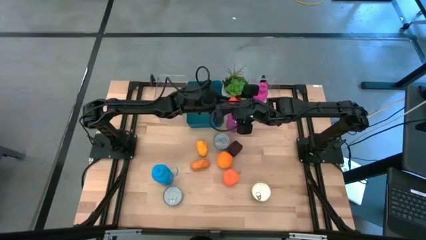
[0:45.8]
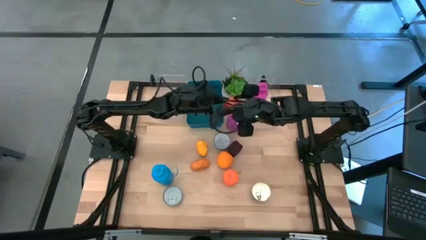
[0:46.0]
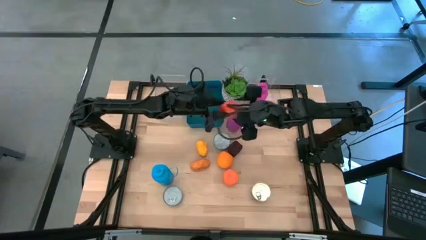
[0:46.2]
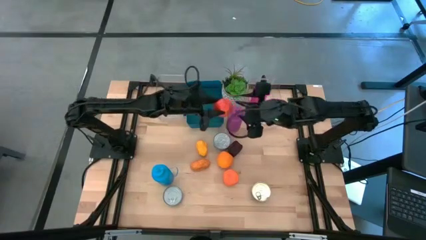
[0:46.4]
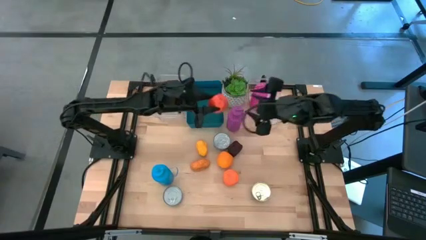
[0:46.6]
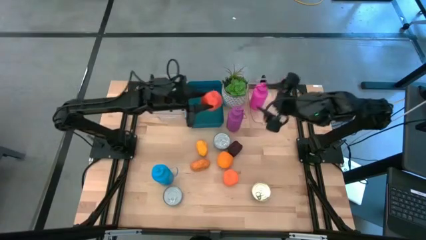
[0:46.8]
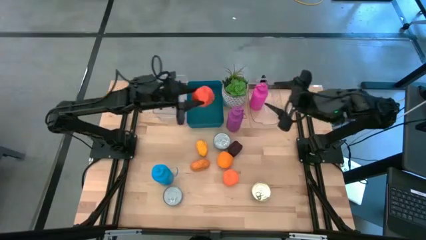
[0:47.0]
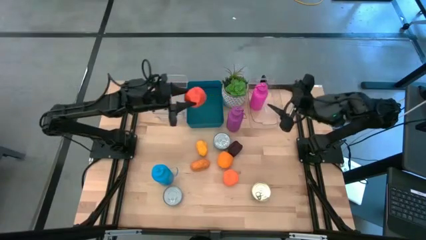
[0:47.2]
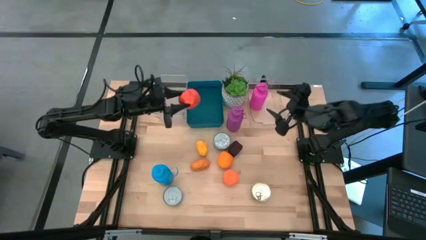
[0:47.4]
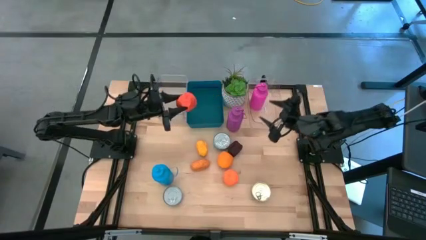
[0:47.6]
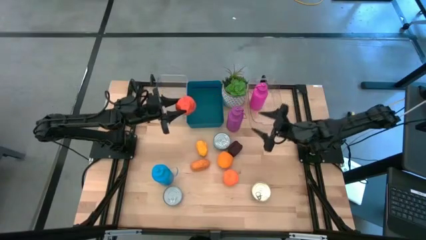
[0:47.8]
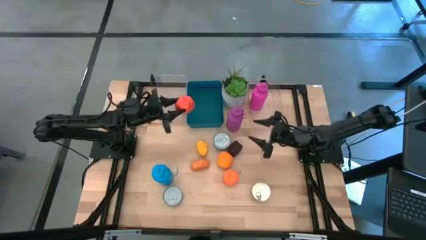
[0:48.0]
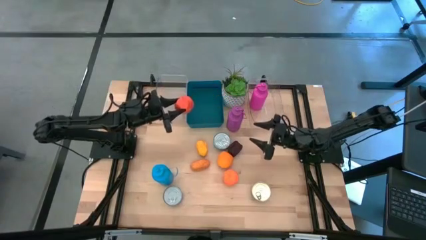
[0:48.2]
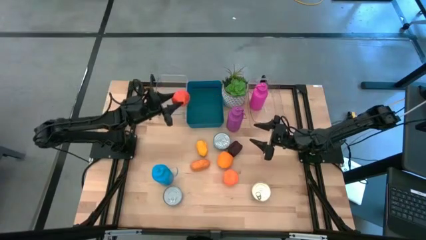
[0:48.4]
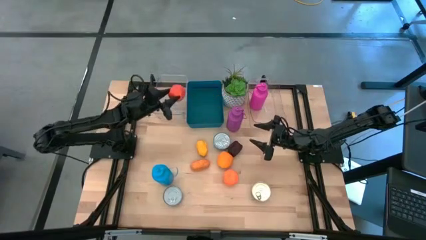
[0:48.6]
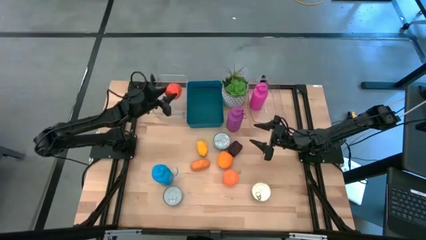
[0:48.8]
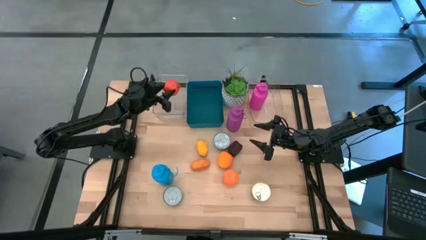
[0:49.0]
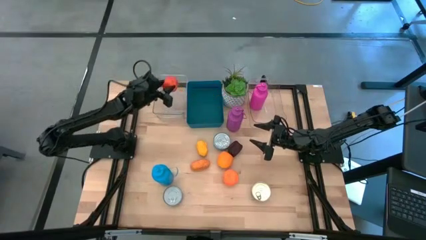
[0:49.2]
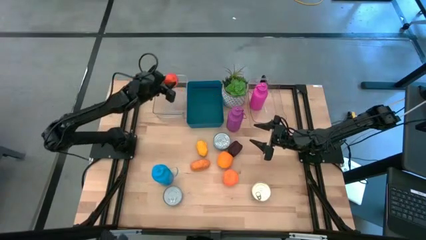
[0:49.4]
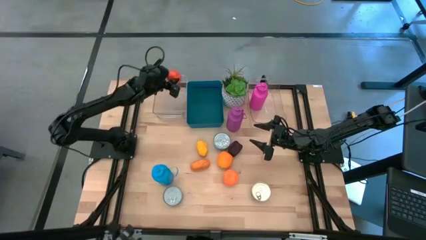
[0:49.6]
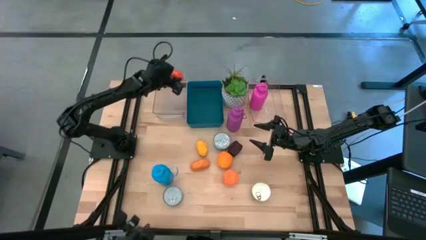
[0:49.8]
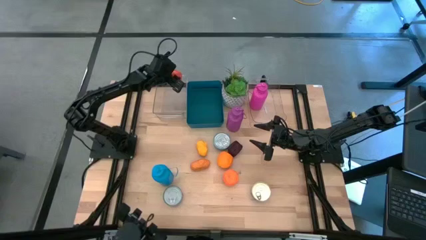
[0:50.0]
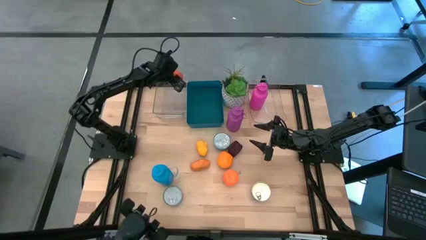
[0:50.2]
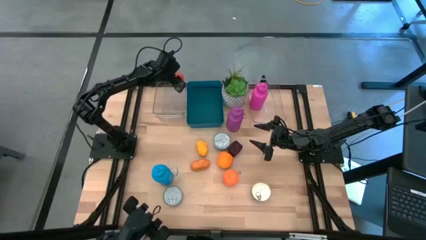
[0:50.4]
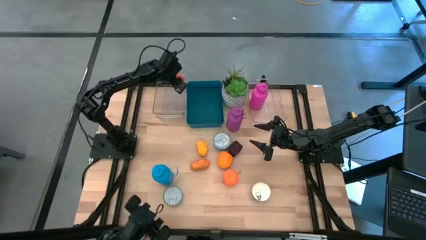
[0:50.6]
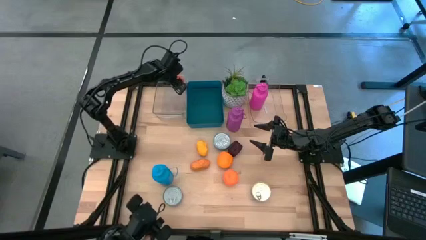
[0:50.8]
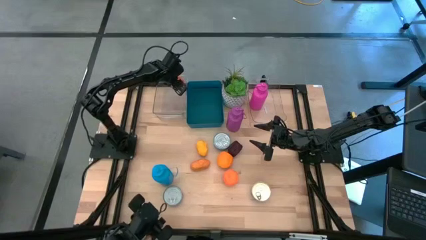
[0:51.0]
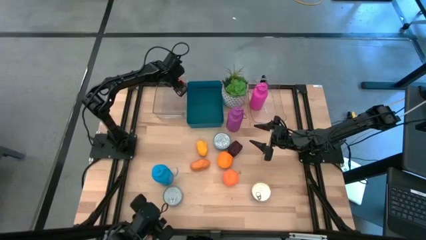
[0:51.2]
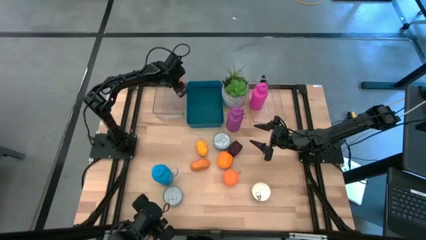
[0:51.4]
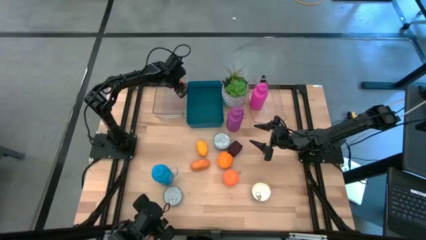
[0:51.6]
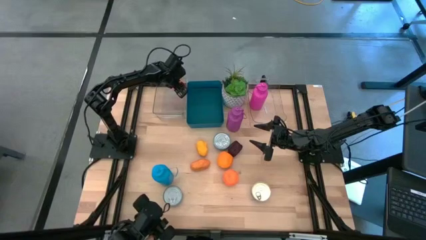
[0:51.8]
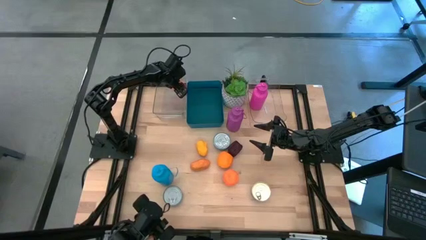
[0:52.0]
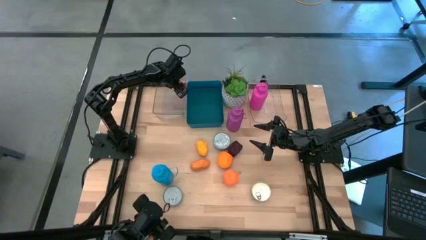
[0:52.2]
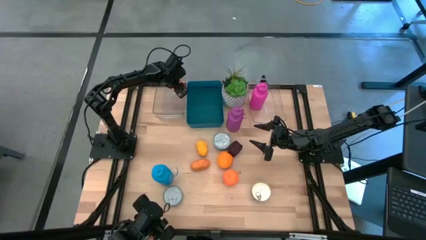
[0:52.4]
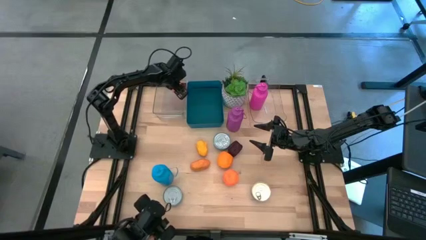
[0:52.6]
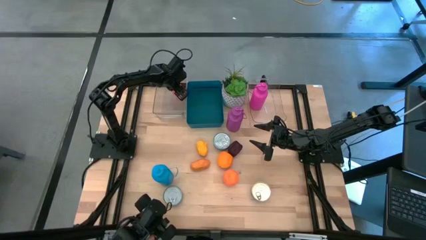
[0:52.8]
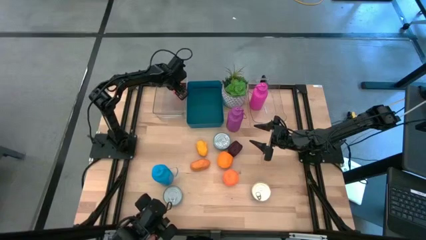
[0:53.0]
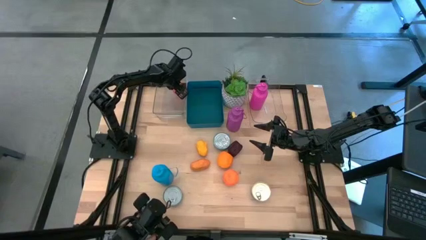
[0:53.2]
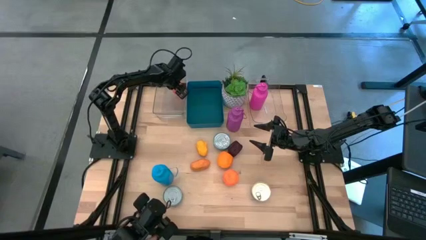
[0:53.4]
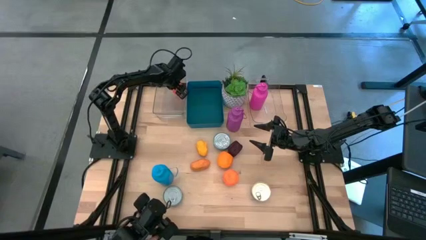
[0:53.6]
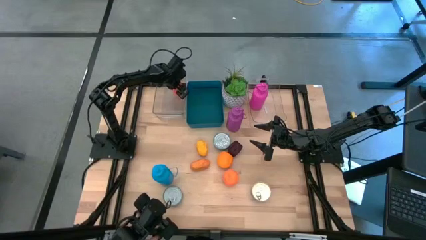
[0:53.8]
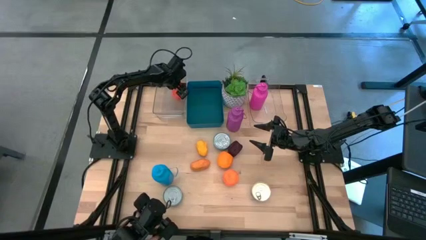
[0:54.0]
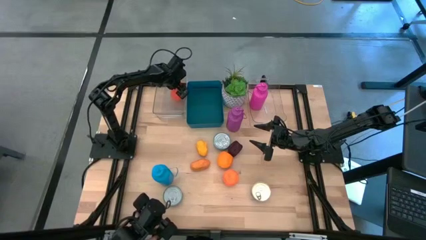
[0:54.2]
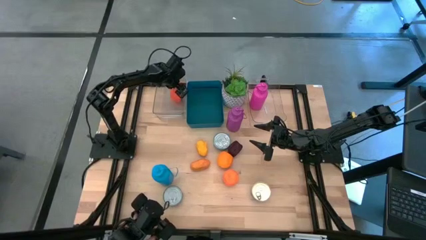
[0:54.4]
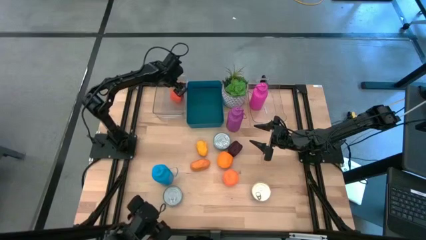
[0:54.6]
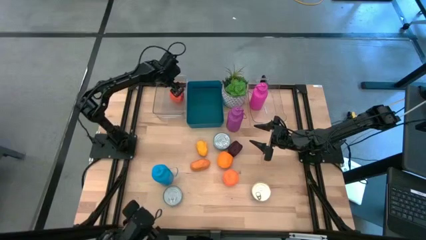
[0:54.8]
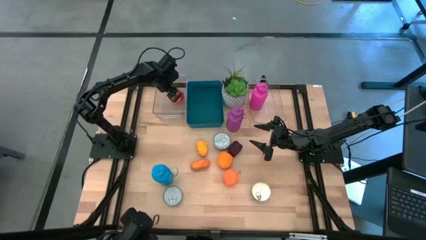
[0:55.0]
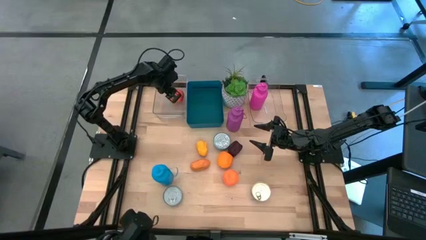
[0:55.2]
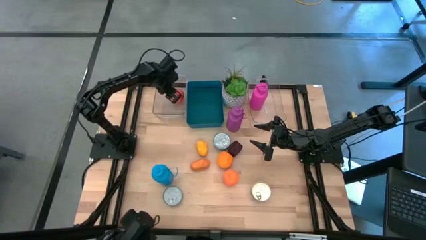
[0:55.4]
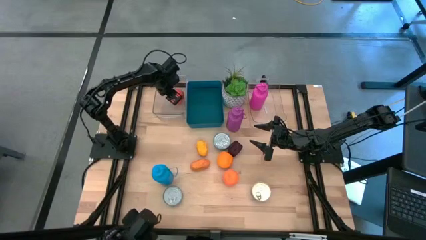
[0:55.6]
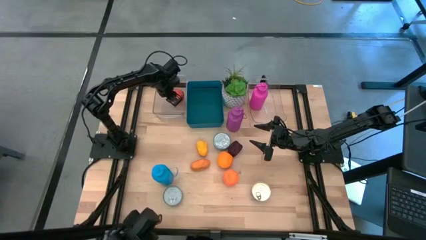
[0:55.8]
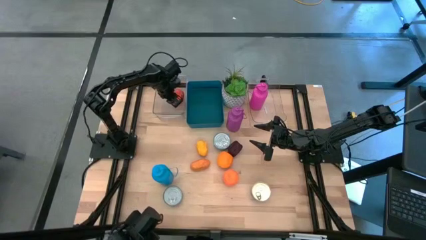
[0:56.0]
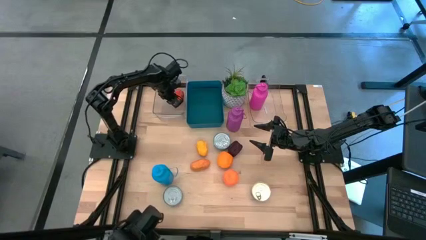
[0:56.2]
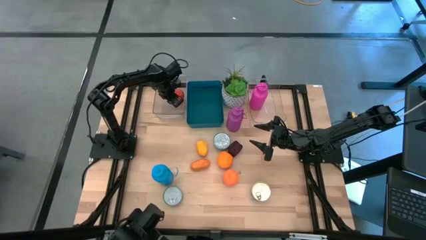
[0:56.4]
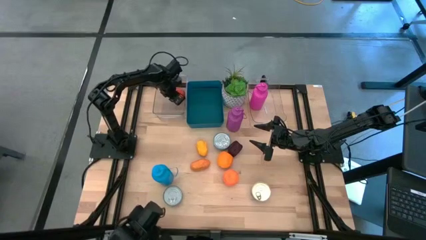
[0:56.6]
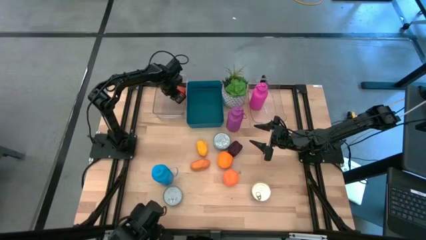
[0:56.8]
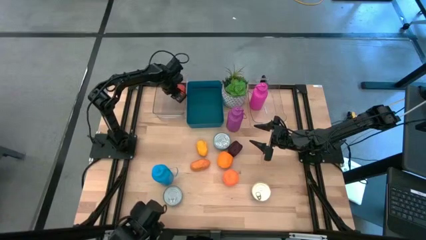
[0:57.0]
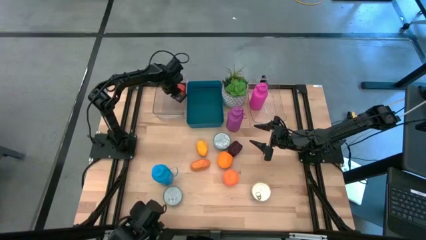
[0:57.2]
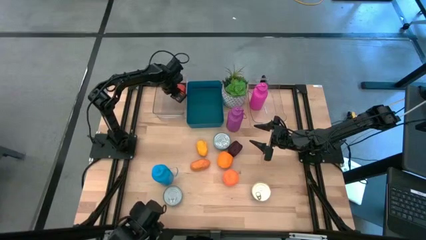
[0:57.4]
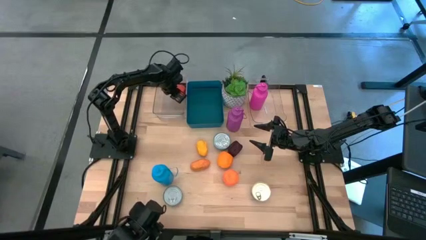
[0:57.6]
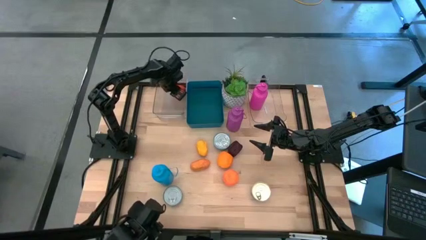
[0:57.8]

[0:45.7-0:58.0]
Task: Pick & Place Food Item
Put the orange into the left transparent bin

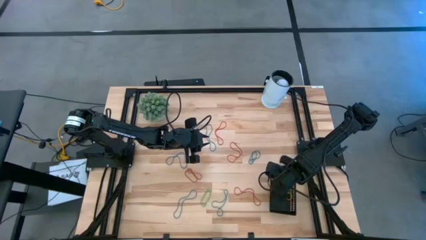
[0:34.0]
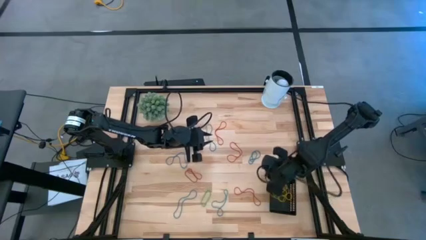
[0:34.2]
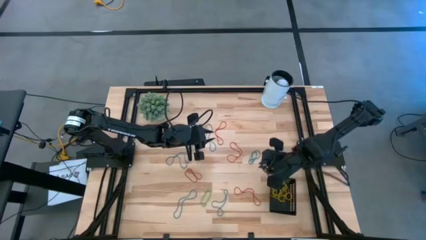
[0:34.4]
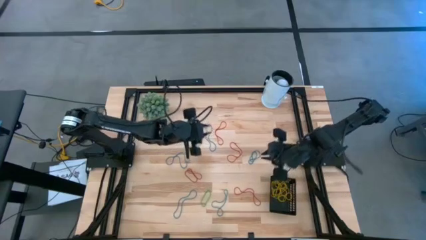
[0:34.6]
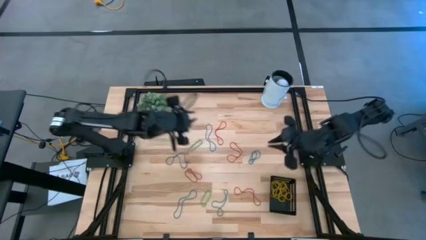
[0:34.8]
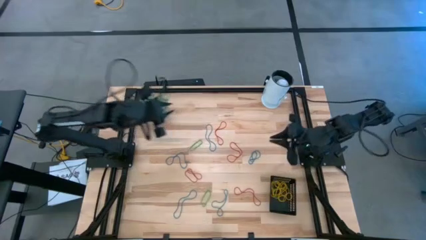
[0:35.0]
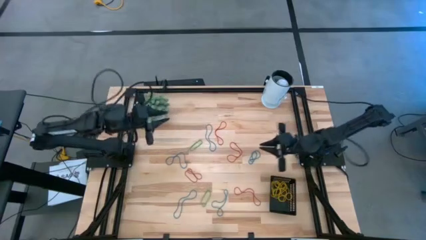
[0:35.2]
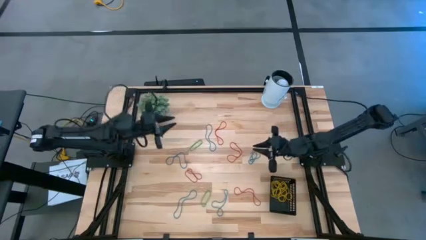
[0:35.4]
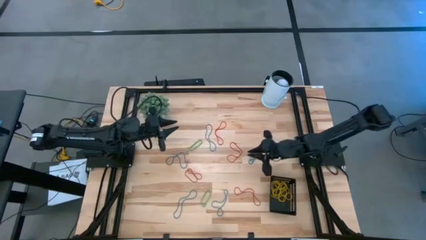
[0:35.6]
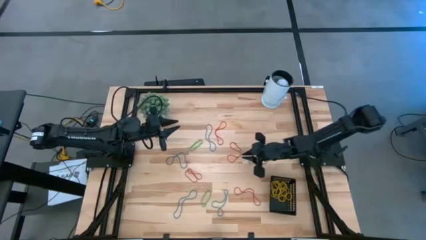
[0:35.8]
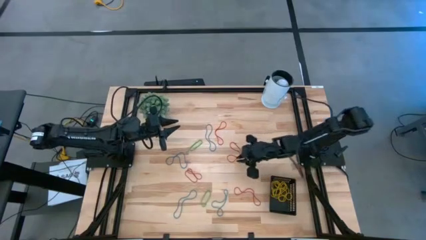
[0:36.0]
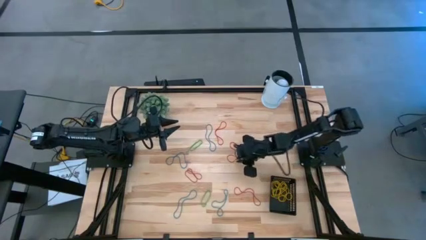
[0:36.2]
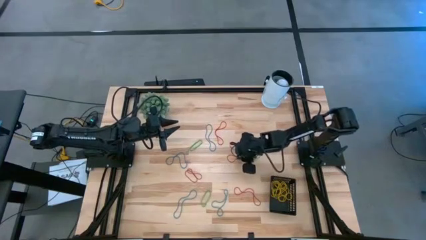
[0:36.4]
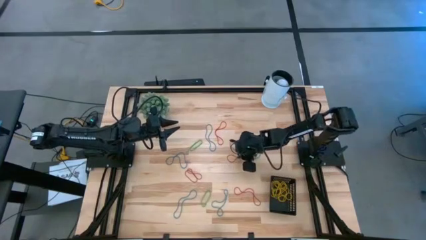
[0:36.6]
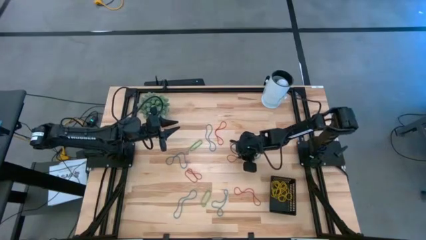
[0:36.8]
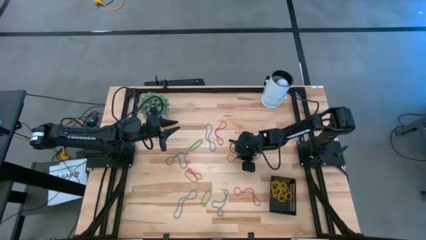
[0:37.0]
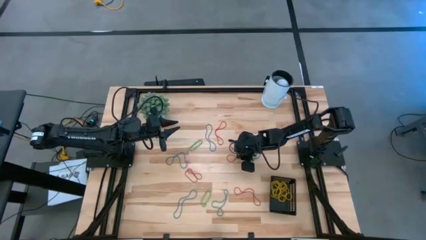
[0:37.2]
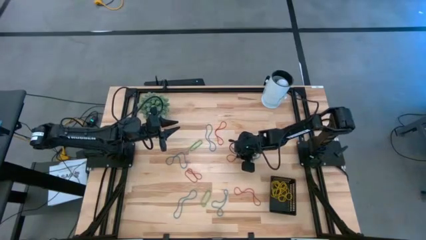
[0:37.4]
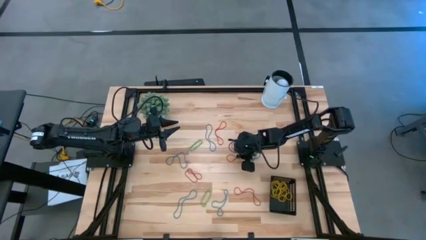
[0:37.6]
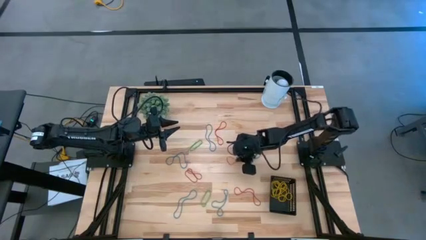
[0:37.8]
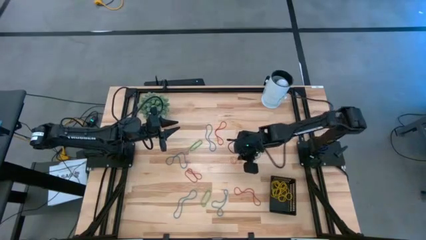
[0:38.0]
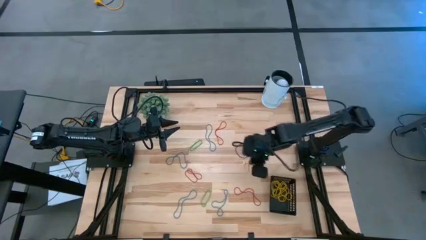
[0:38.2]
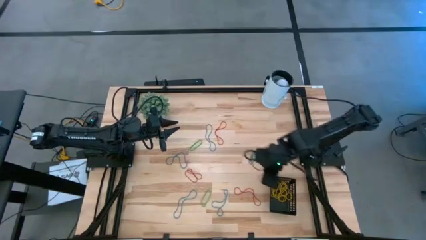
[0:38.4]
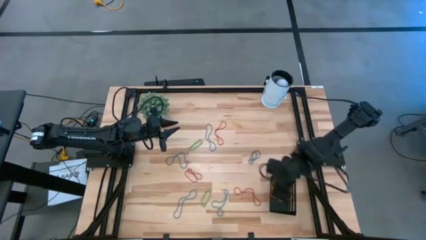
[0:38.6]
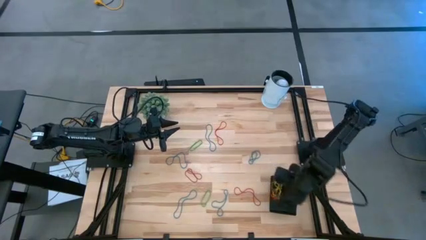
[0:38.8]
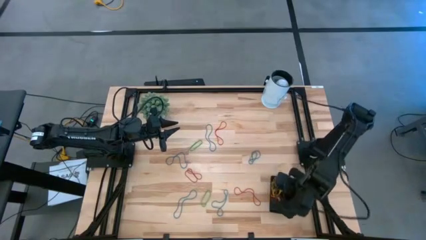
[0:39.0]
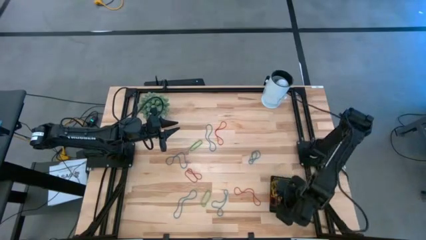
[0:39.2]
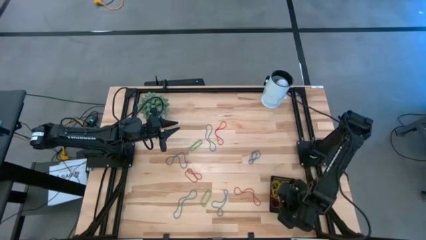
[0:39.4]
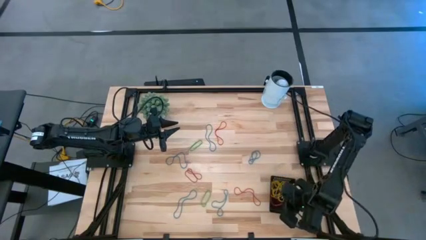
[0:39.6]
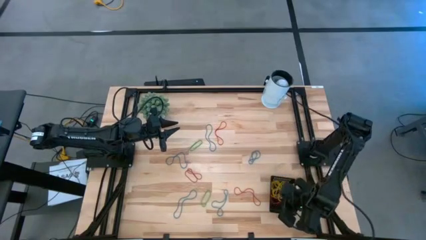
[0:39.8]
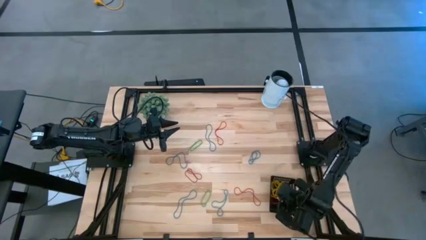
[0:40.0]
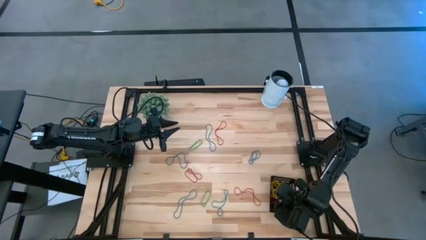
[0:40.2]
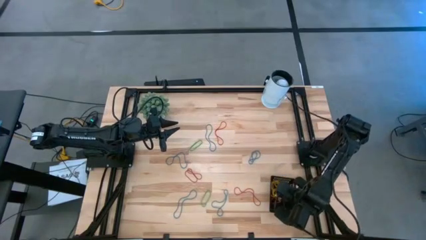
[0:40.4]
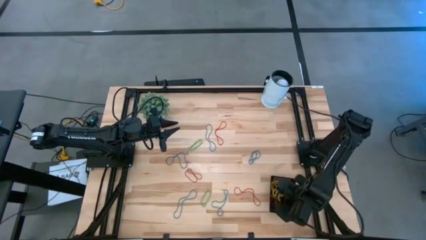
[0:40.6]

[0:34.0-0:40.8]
Task: Pick and place items into bin
Put the right red rubberband into the black basket
